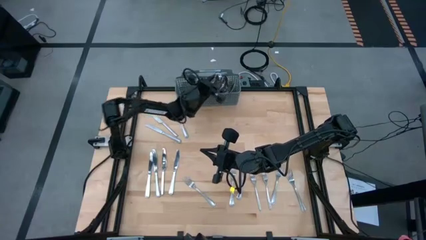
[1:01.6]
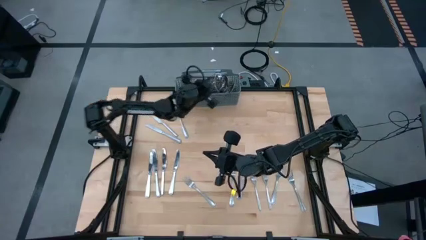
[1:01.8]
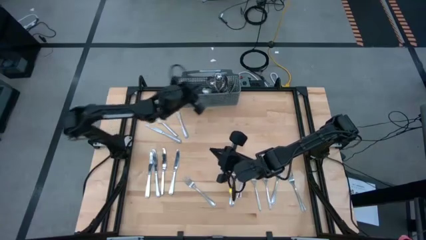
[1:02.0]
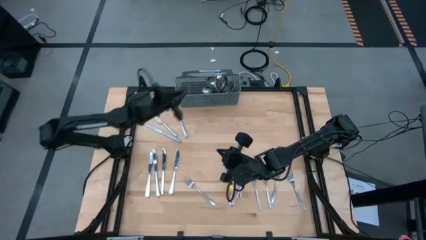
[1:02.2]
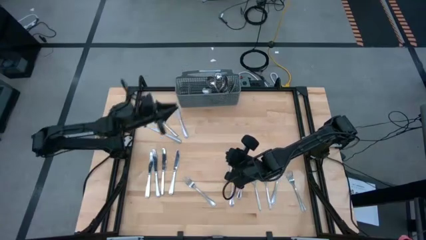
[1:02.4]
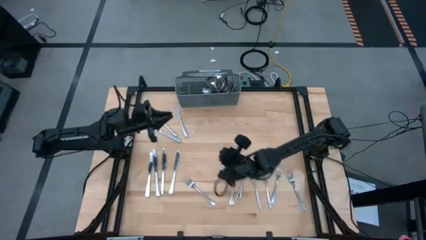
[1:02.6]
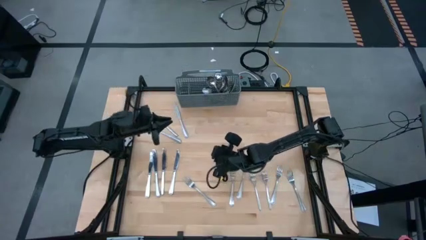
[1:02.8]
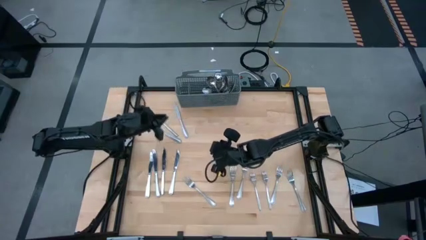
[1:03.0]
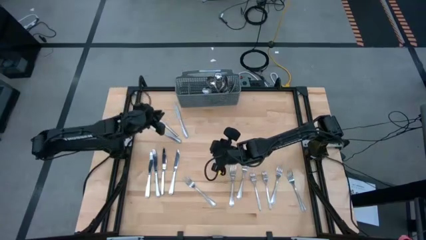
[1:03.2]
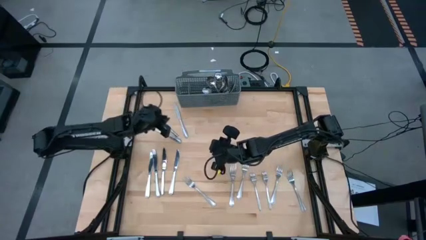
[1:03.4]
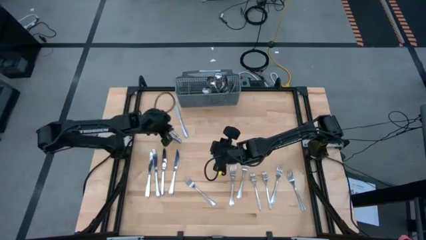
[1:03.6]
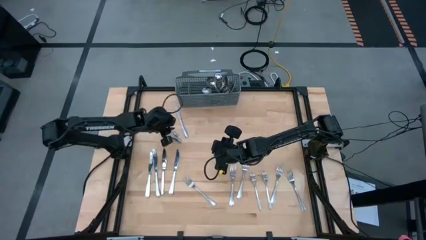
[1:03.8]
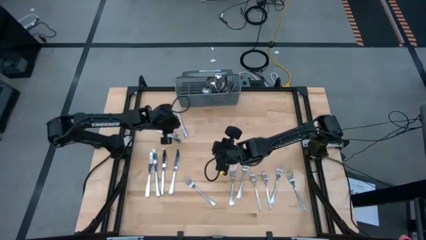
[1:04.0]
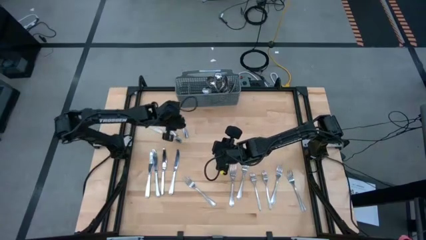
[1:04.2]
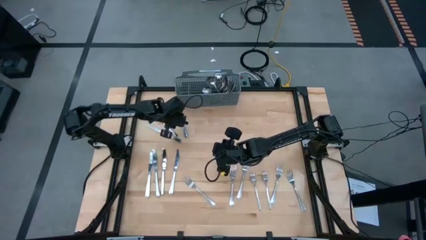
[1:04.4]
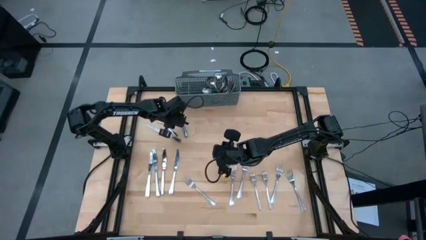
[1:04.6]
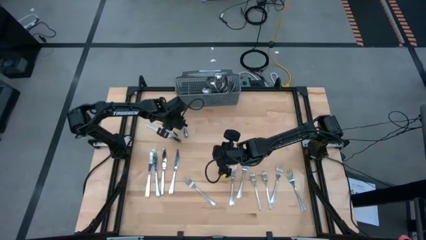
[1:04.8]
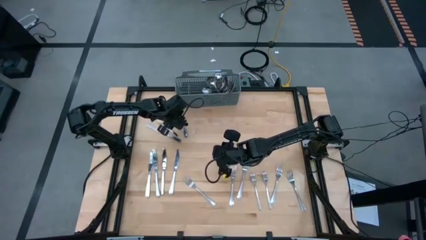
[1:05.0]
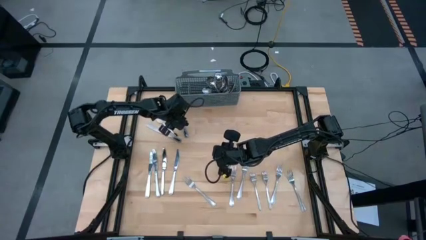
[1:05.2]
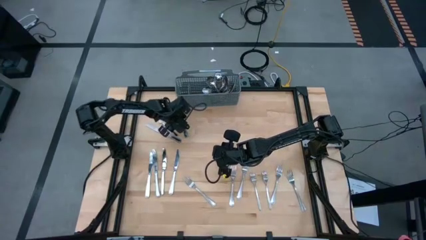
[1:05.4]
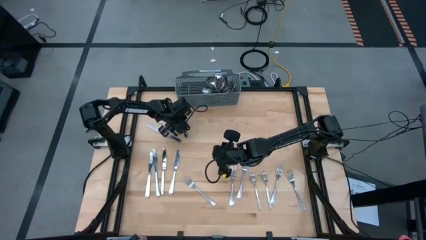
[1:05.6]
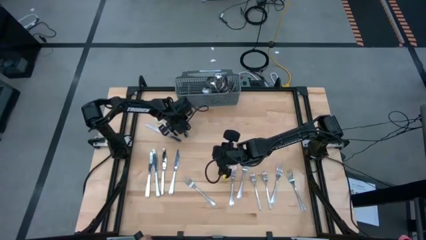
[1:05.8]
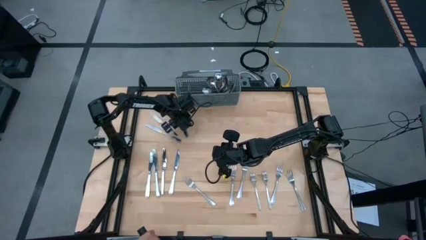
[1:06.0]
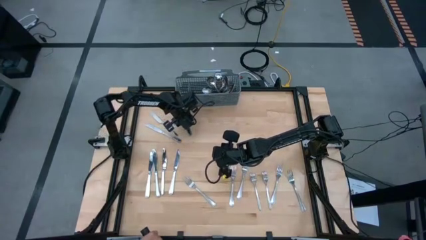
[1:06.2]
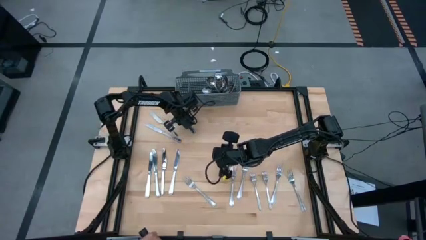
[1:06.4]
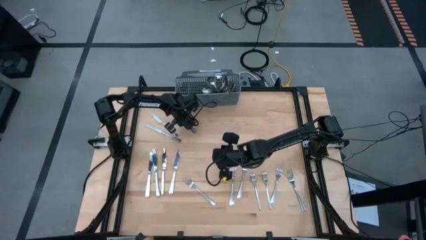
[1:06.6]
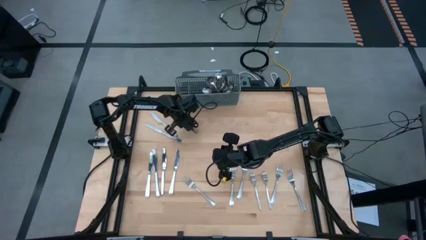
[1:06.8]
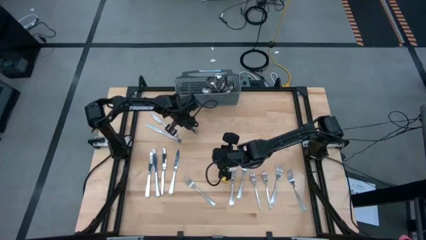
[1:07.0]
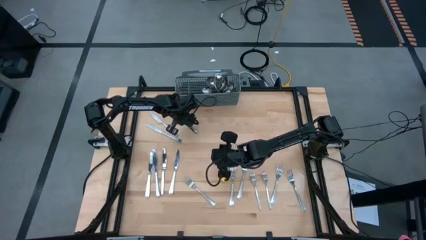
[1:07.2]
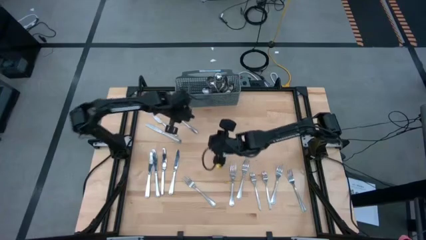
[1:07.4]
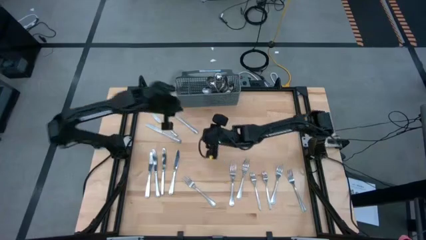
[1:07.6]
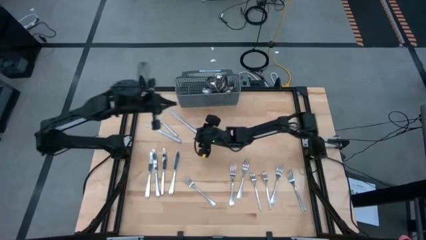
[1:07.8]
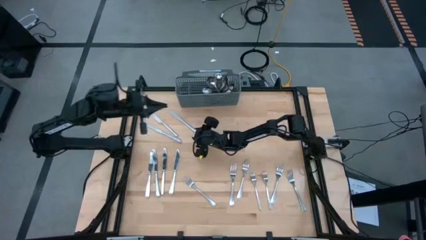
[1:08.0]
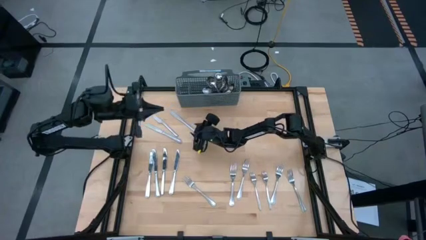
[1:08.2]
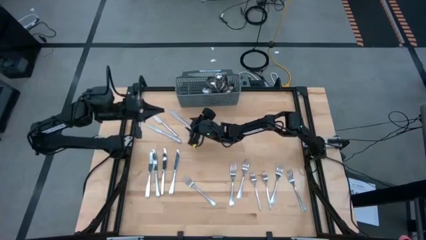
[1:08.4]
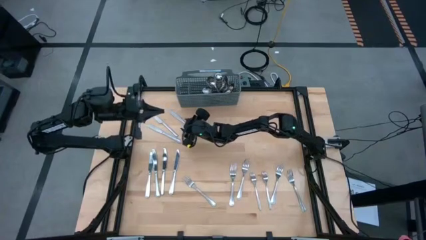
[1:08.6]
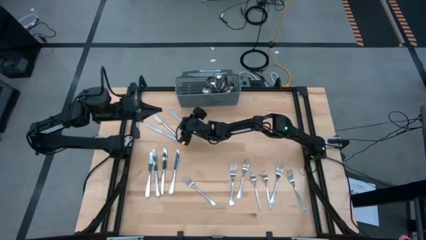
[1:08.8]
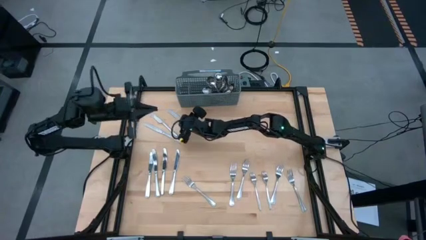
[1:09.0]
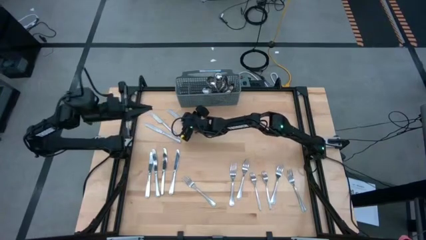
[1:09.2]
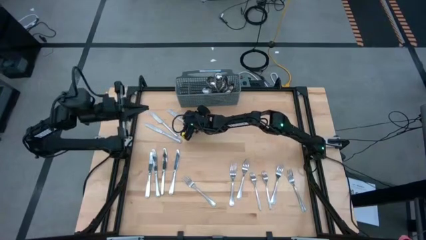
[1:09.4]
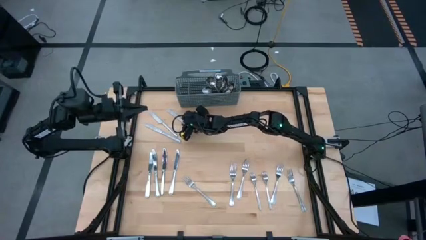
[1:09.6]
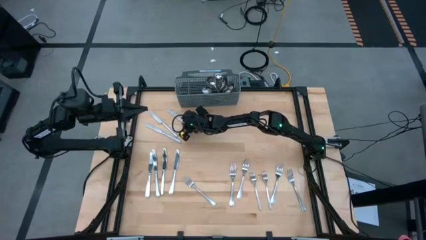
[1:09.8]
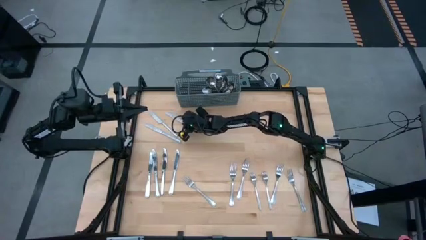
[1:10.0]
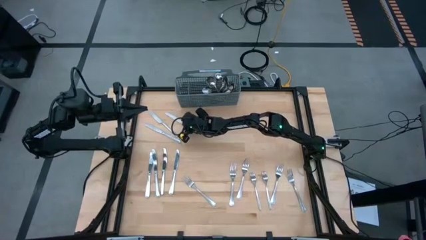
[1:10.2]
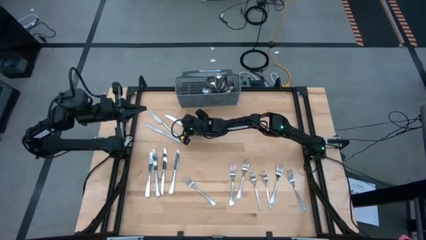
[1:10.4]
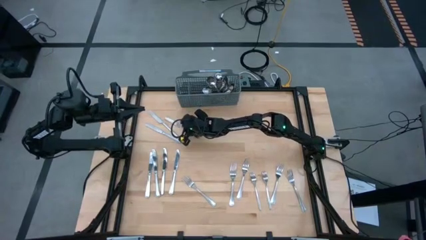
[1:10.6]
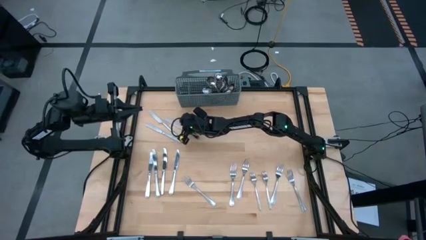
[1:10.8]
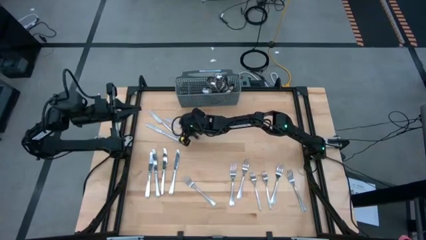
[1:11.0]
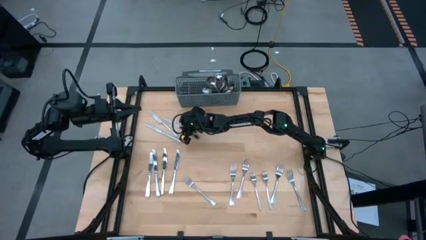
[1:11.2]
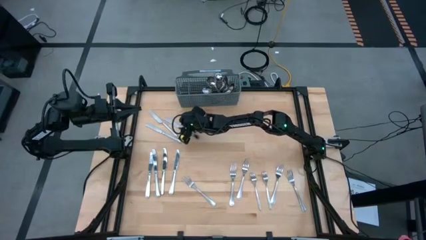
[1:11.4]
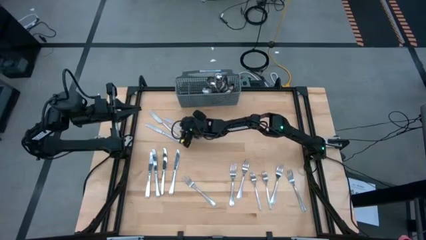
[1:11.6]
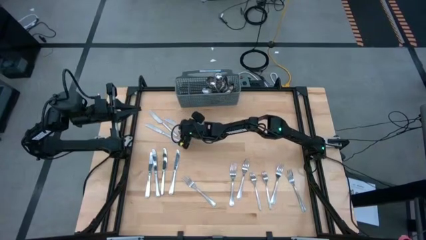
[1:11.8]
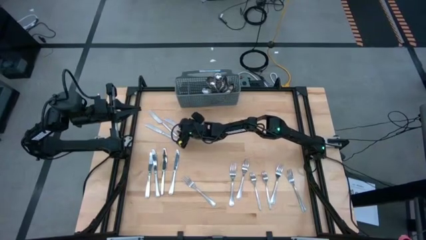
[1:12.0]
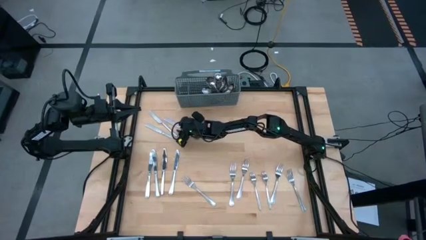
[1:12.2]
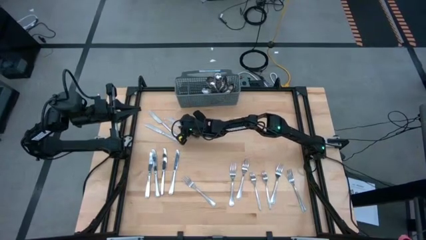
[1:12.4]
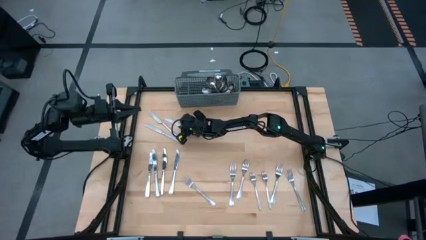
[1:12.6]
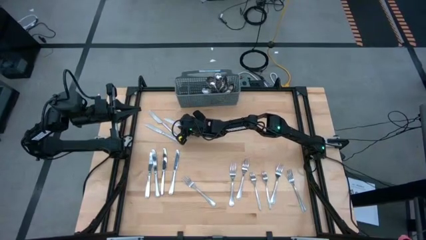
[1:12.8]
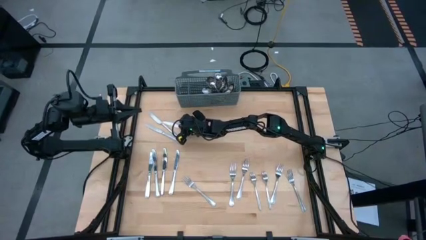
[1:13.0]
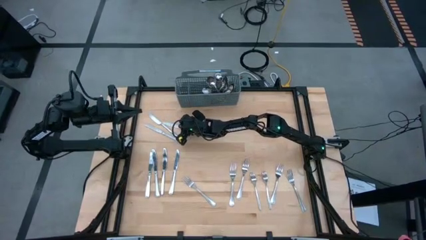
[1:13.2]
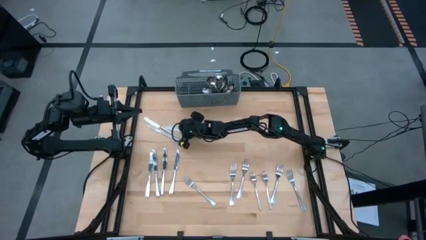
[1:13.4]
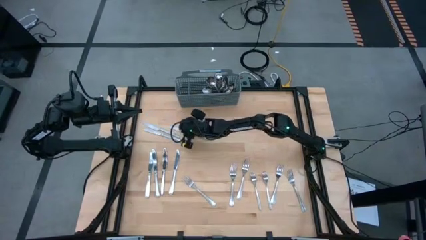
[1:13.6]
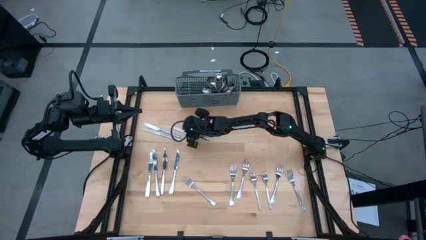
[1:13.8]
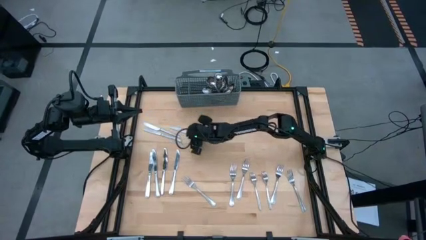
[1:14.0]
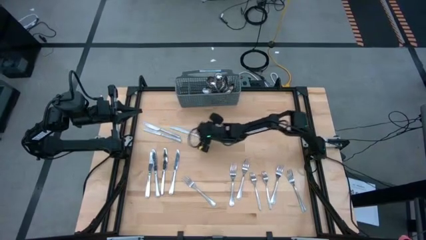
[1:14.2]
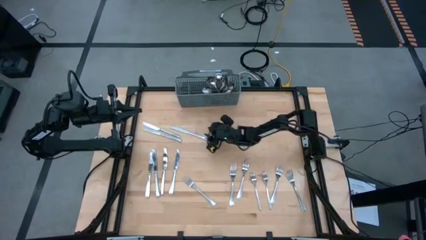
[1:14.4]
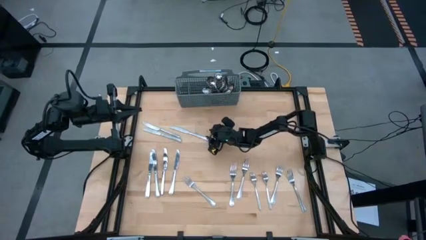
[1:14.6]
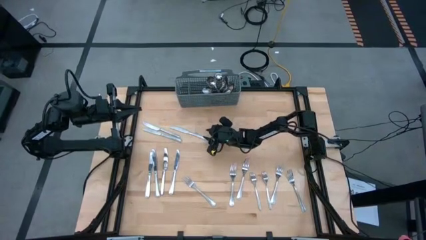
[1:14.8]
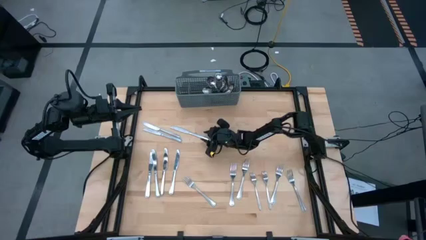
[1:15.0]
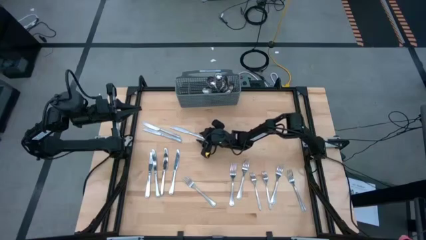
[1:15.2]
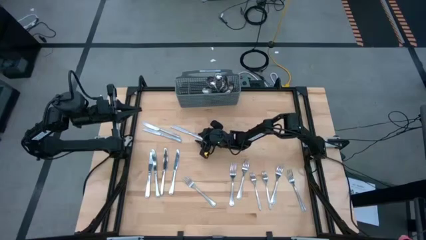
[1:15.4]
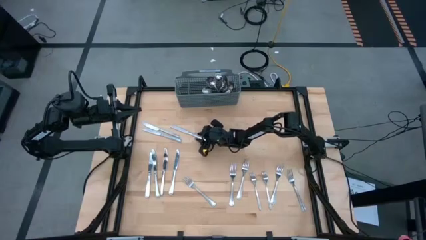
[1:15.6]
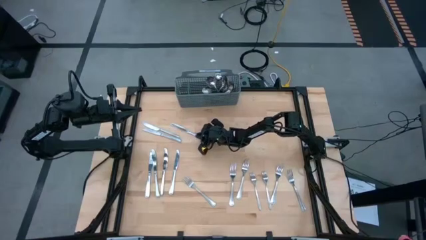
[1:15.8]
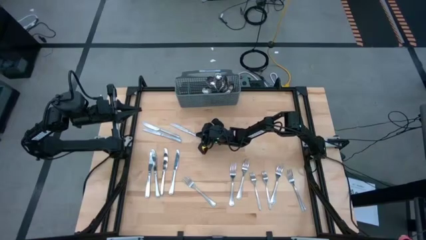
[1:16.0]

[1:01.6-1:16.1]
Task: Sort silverware
Put the silver knife into the gray utensil holder
